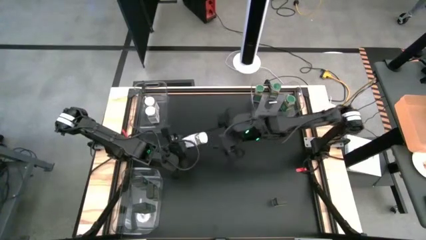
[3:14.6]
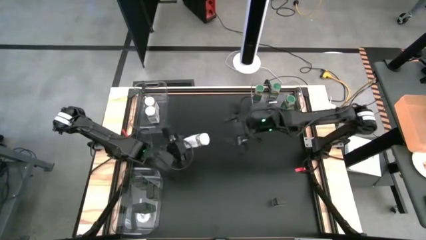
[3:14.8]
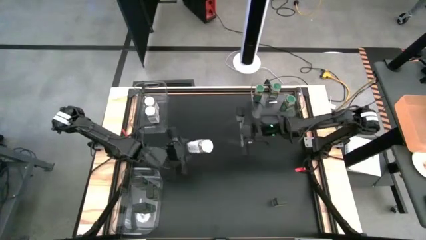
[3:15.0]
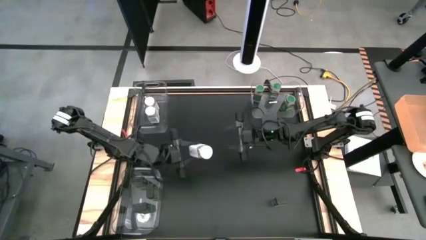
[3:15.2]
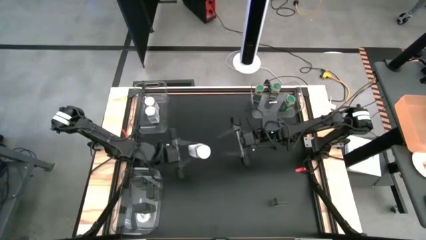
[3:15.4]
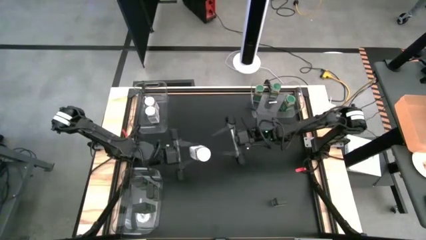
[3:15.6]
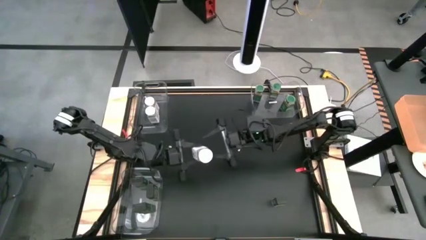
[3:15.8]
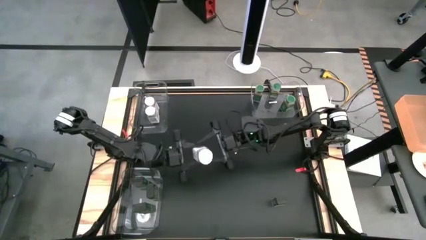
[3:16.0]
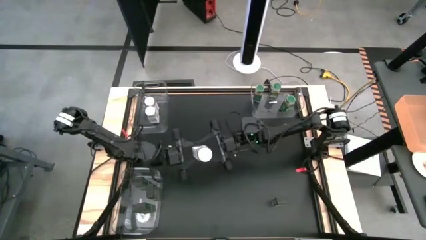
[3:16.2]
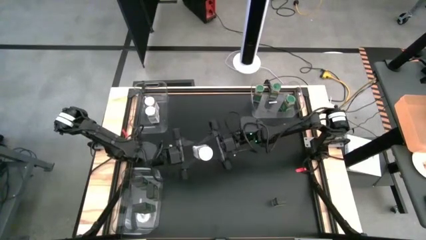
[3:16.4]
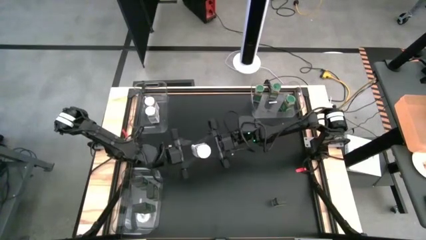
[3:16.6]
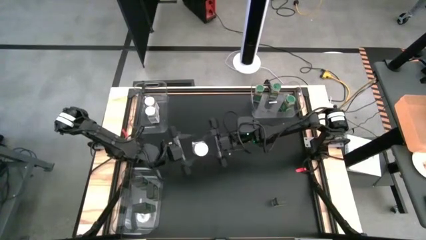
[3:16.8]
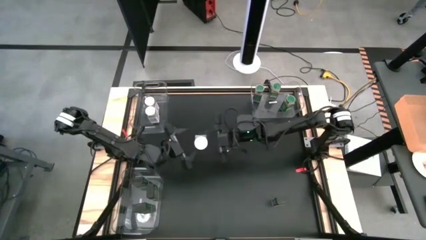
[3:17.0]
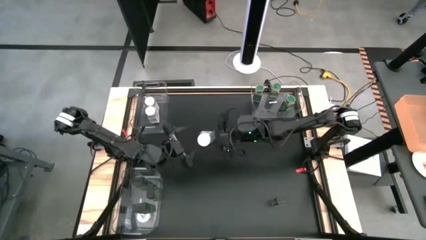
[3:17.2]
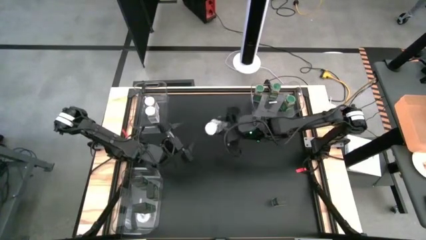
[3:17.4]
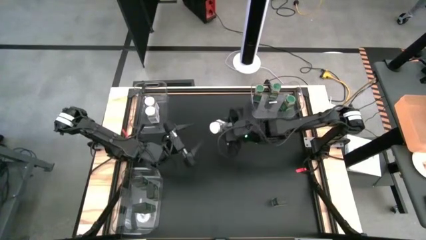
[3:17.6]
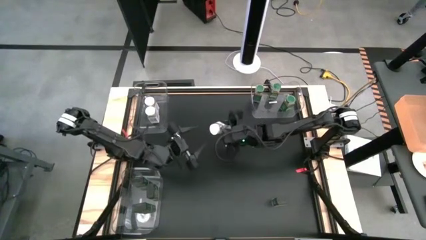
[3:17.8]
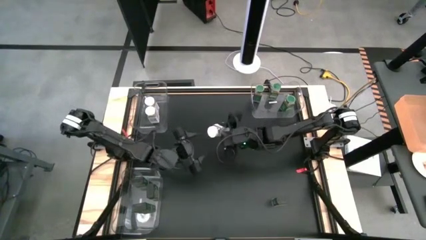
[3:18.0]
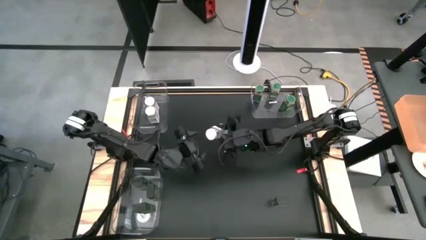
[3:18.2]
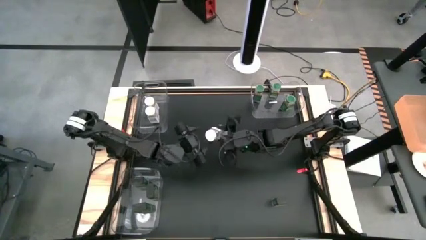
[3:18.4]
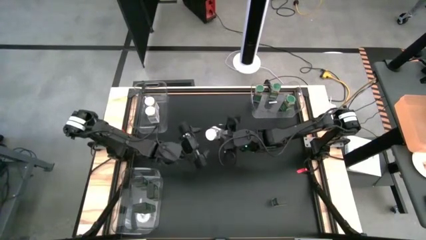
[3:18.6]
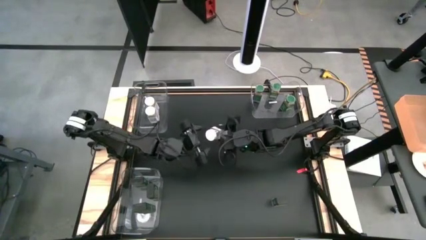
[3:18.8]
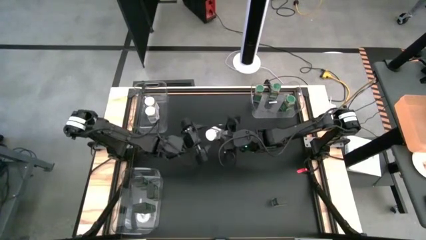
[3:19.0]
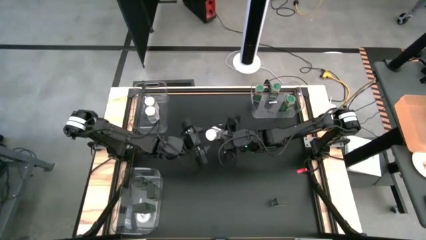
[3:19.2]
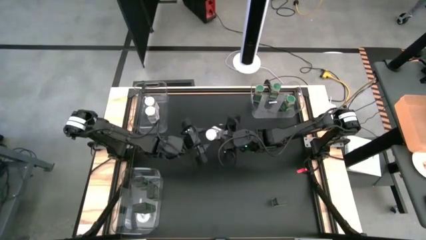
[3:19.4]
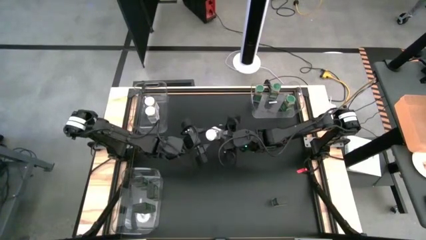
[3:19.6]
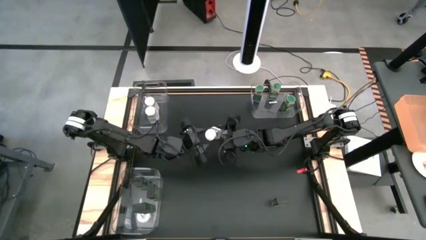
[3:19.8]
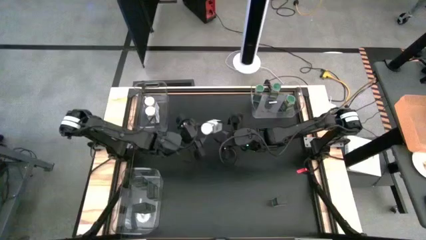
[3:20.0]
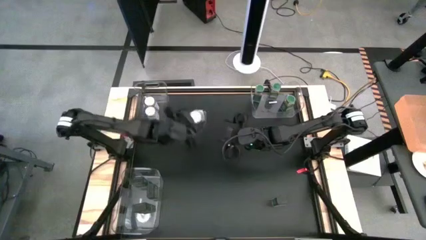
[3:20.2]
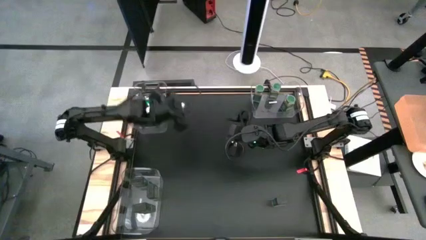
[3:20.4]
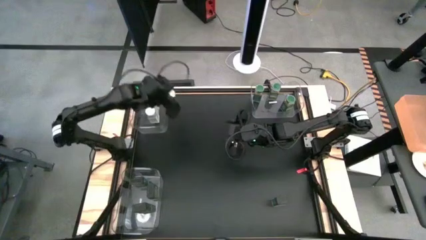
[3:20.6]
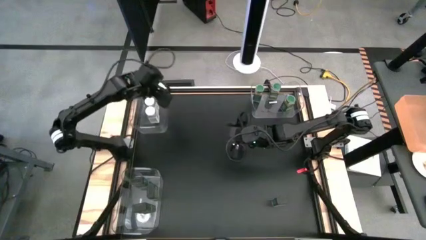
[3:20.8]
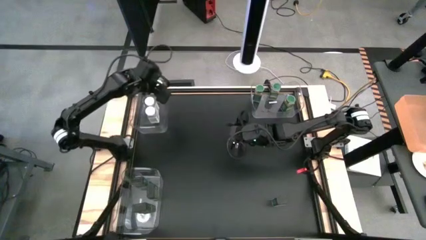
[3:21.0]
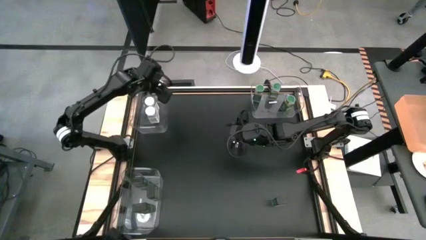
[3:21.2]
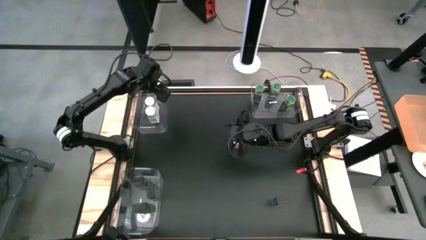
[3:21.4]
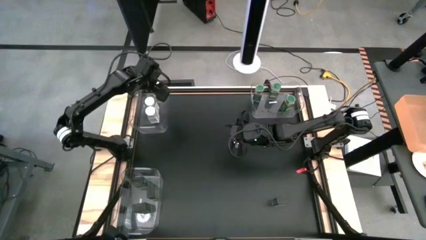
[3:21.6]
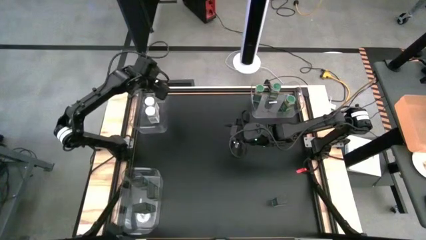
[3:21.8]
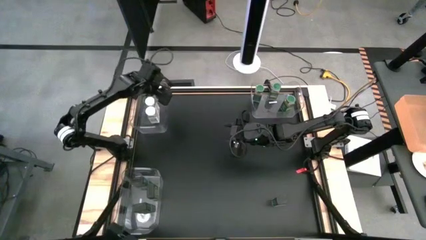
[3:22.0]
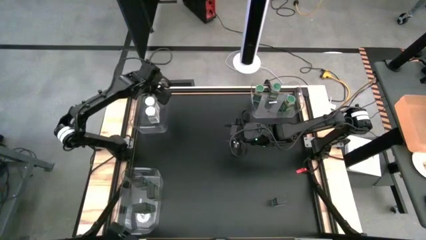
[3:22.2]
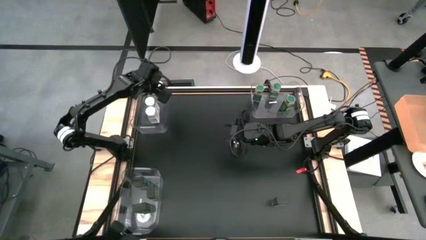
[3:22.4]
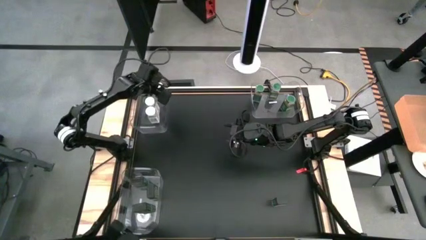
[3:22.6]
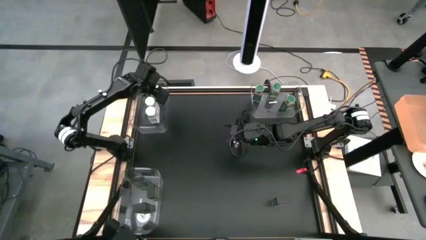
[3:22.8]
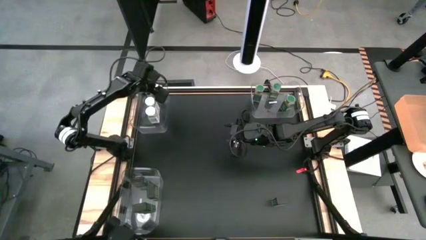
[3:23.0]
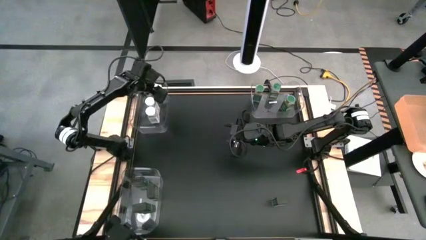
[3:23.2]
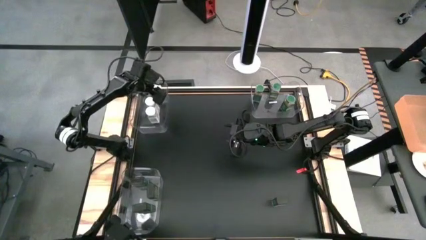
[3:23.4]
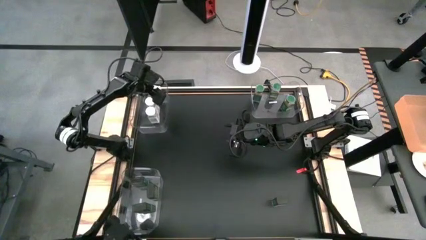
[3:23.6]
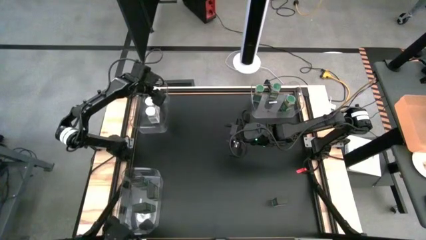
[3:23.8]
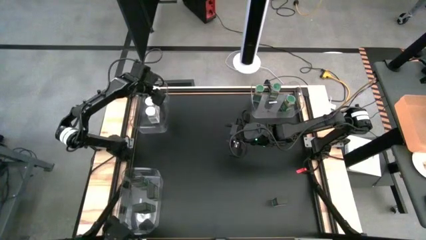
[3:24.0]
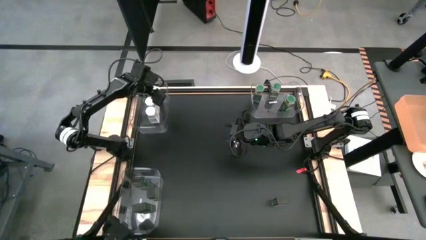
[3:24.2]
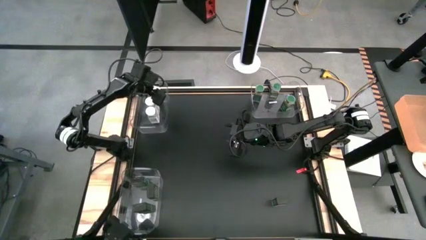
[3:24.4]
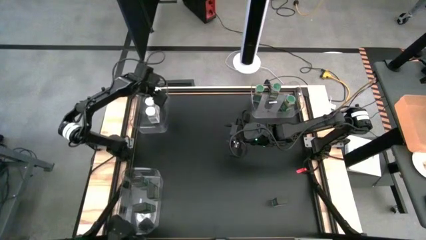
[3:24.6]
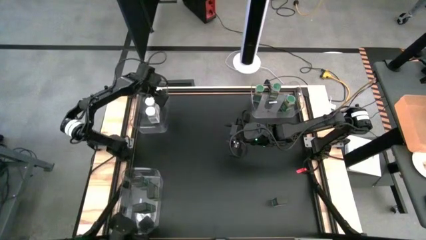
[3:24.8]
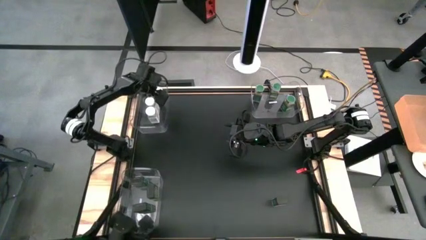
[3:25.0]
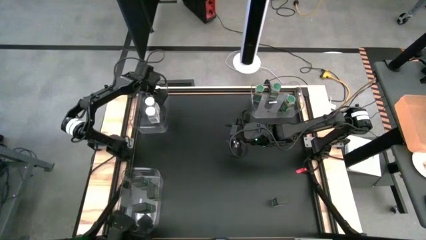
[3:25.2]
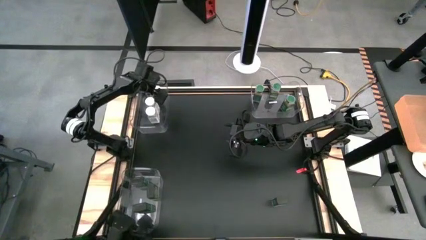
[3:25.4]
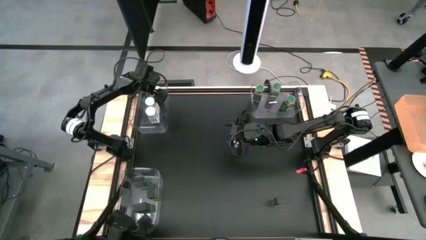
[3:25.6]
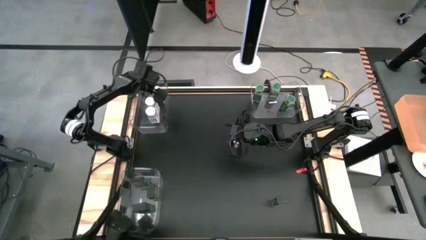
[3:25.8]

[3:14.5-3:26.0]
Task: Sort spices by type
Put the white seasoning bottle into the top left transparent bin

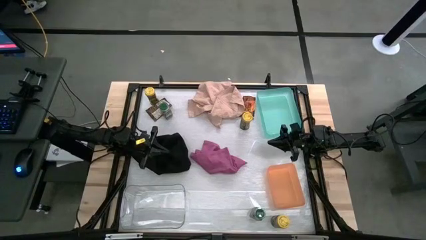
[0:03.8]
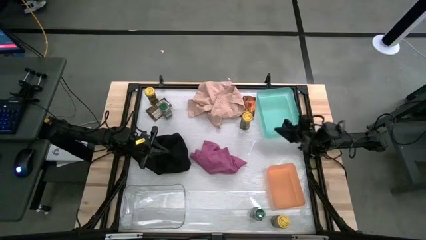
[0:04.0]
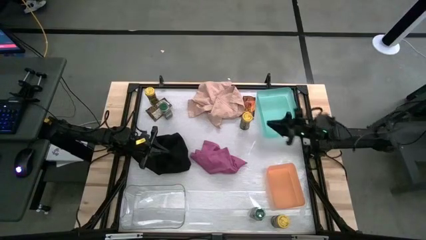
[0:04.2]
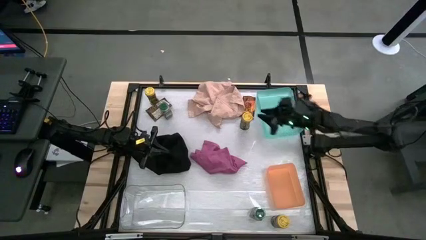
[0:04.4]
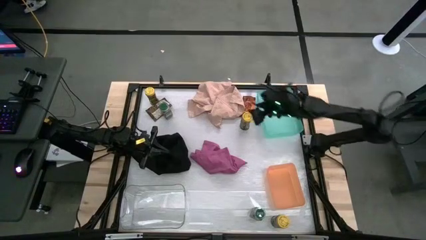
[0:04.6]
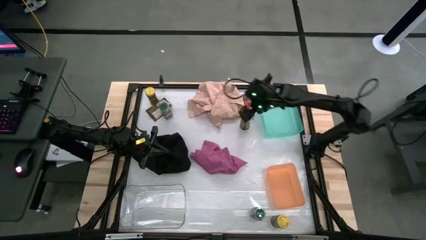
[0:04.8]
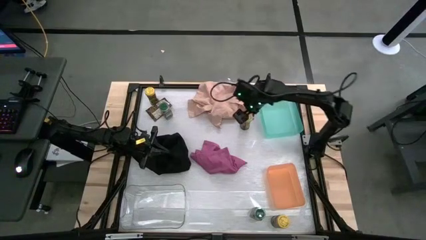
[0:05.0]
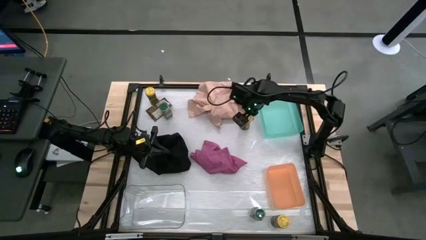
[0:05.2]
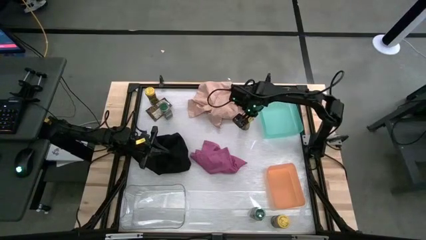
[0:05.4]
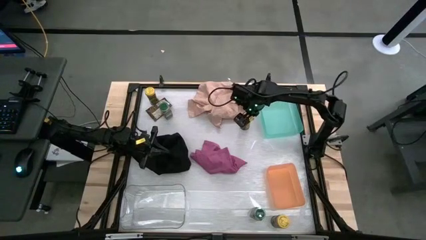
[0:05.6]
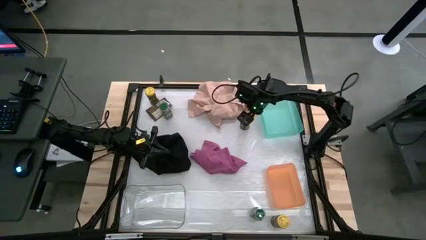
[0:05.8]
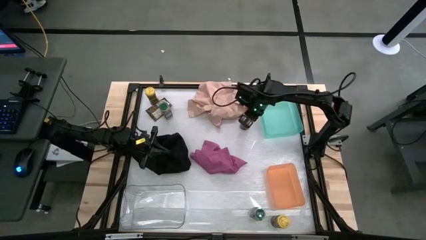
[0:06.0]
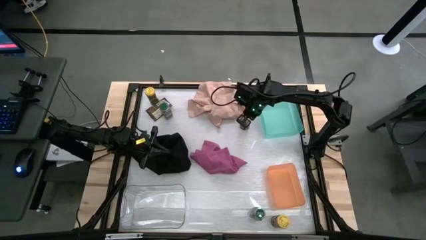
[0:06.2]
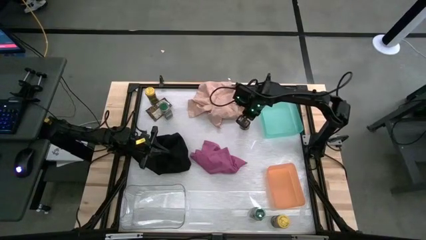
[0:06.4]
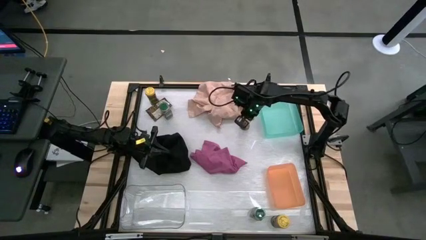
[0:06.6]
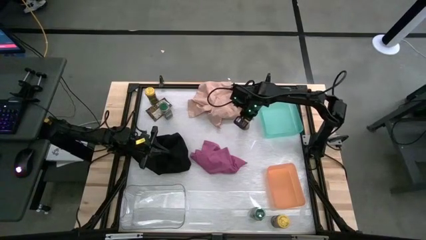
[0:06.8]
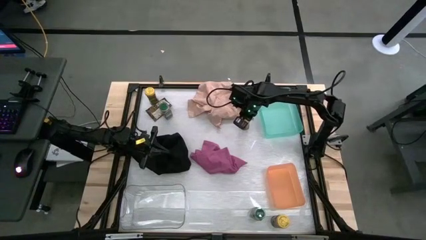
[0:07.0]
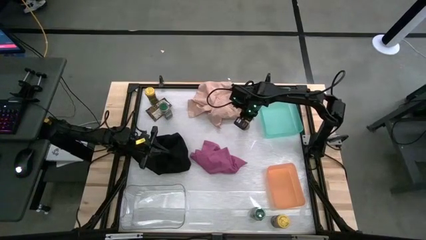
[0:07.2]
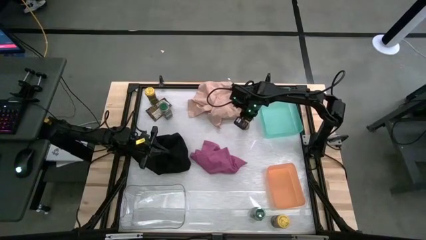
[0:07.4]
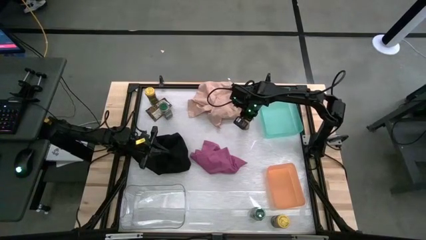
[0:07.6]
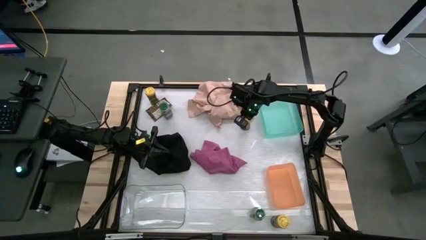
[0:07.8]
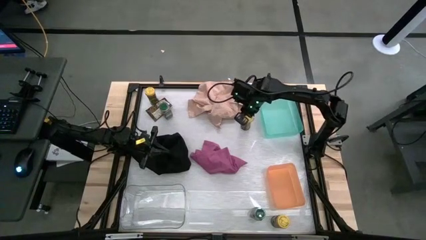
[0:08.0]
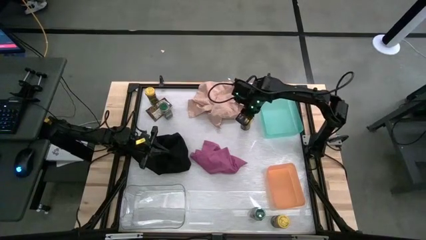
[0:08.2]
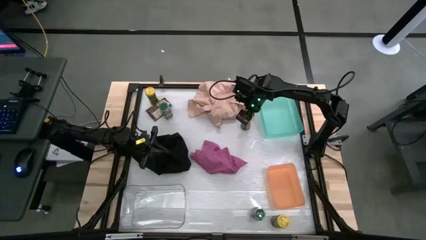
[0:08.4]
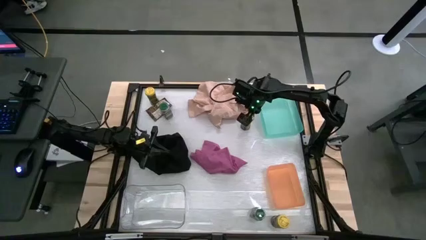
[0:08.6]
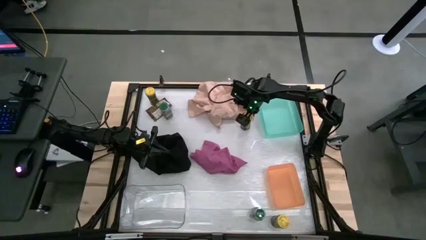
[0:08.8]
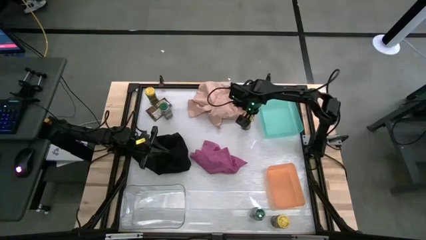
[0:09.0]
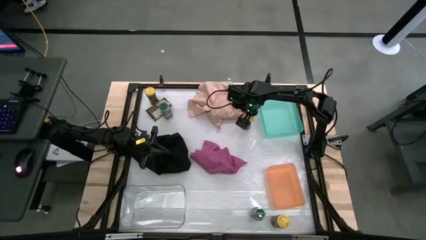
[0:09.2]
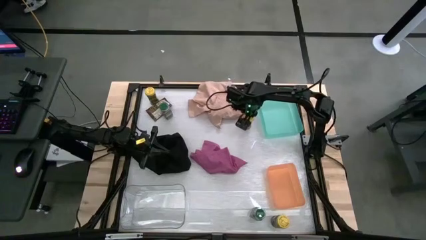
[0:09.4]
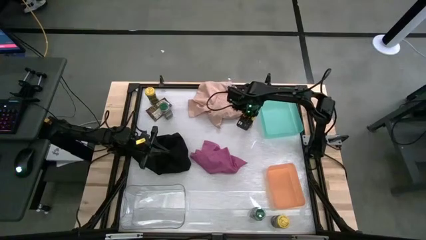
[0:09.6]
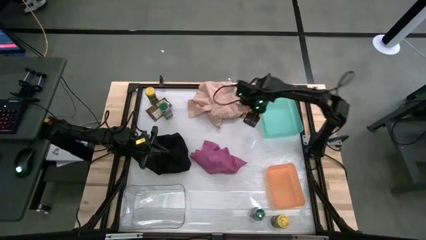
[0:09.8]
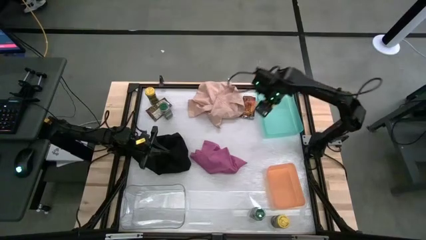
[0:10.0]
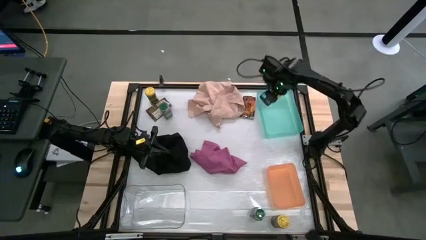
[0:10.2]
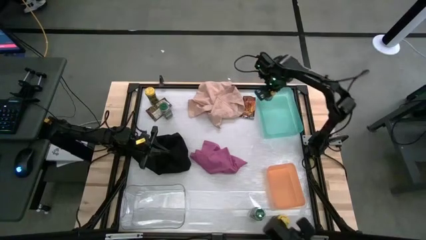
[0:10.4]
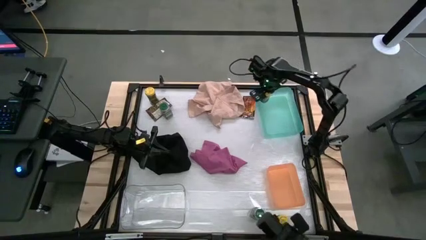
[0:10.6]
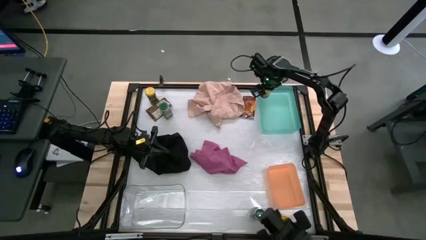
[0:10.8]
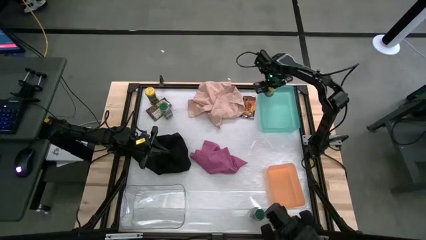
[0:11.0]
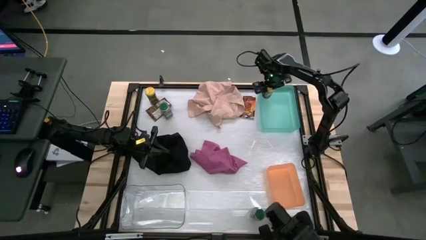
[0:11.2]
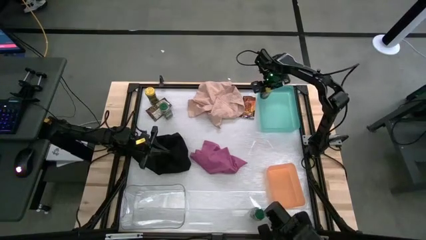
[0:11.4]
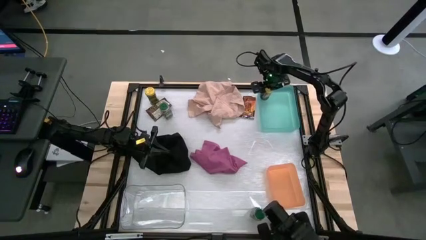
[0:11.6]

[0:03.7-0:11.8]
Task: Sort spices by type
Put the middle right yellow seasoning bottle into the light blue bin
